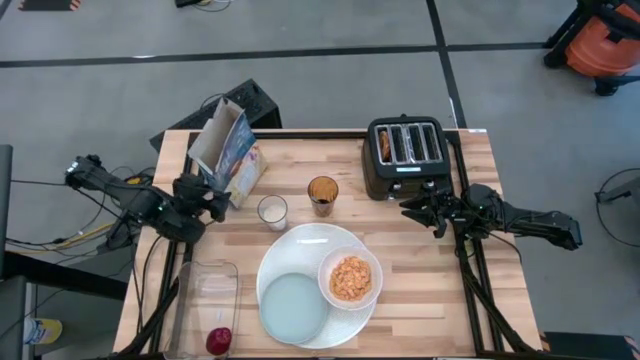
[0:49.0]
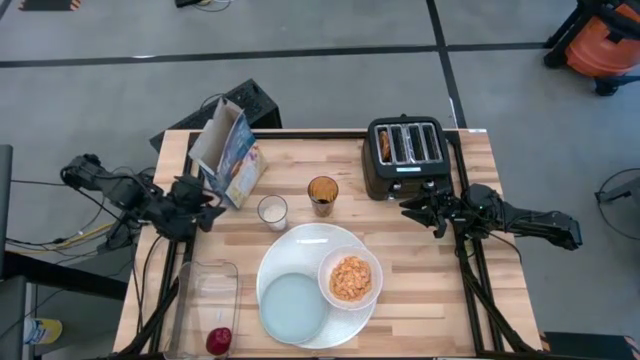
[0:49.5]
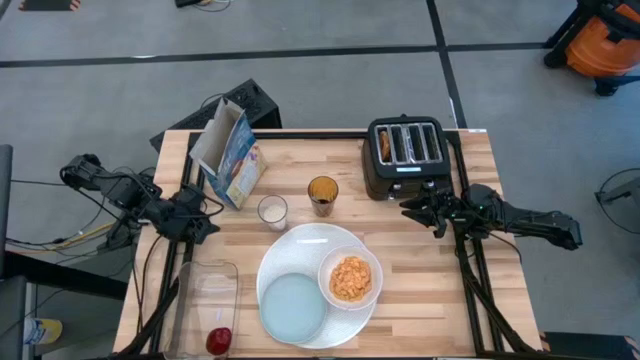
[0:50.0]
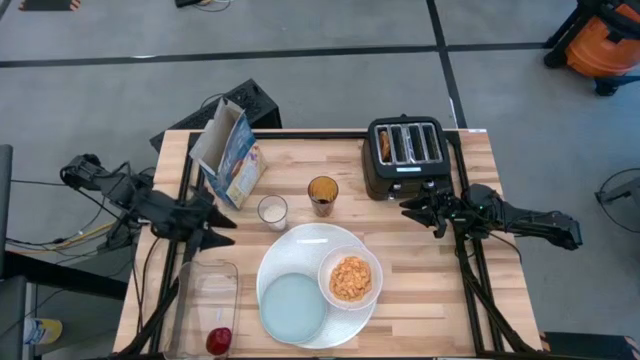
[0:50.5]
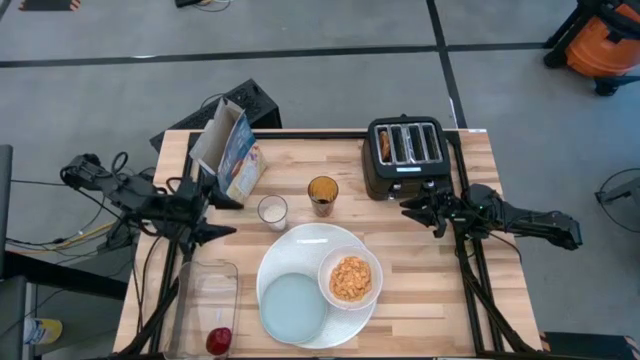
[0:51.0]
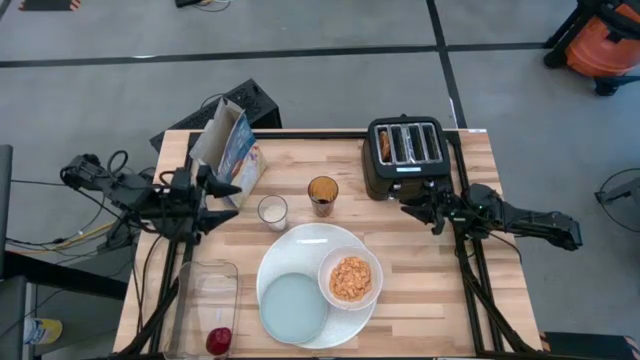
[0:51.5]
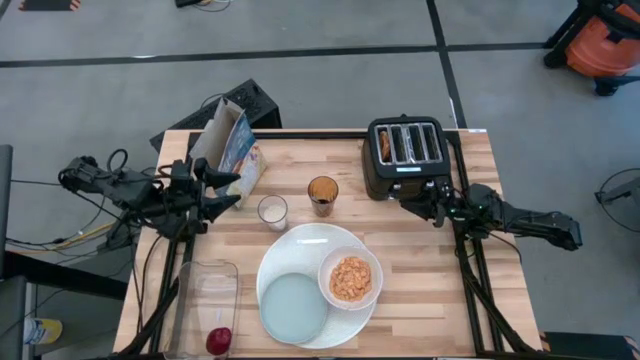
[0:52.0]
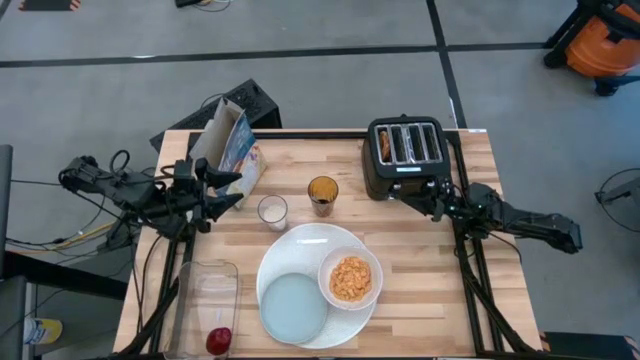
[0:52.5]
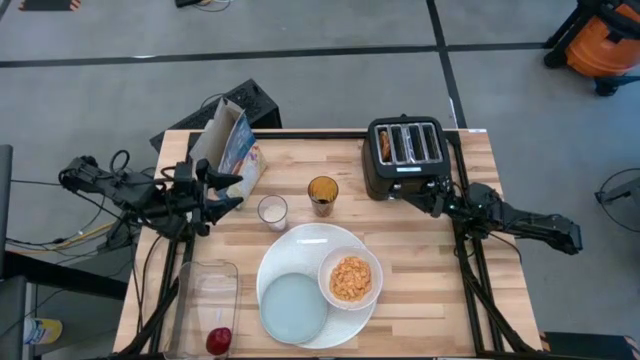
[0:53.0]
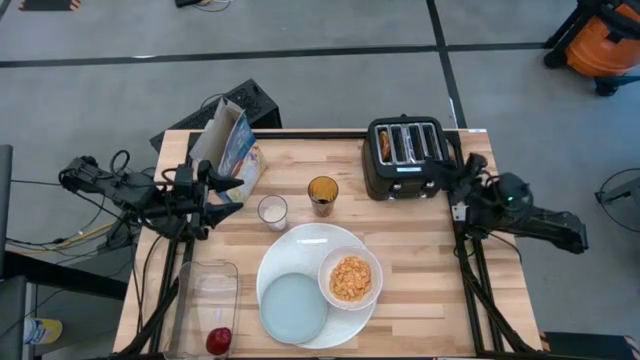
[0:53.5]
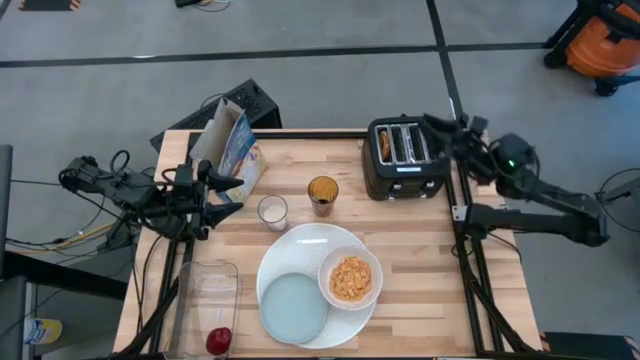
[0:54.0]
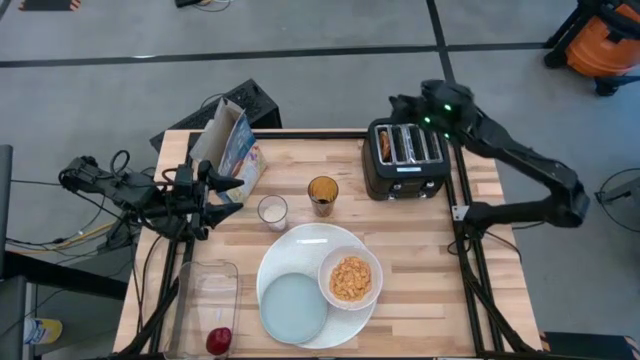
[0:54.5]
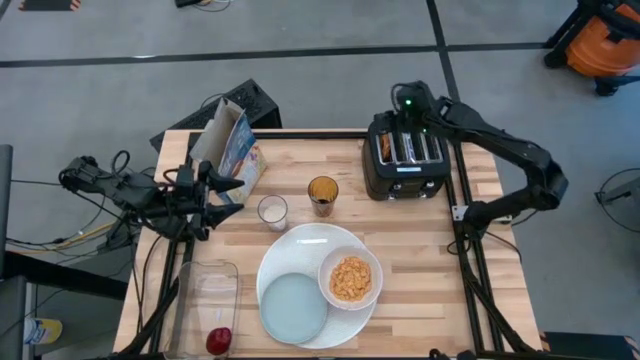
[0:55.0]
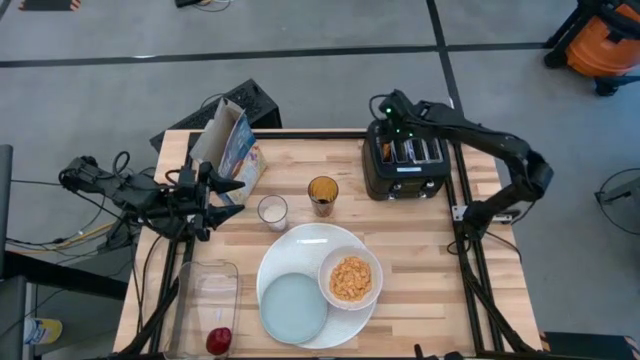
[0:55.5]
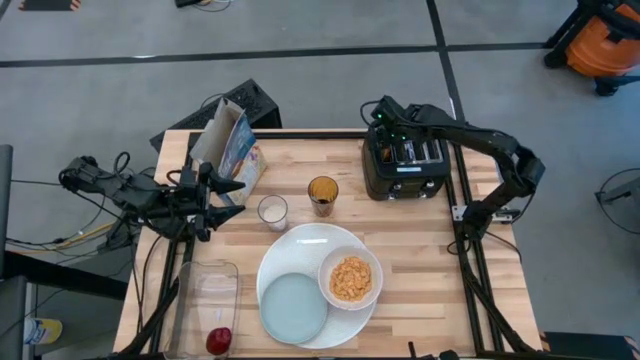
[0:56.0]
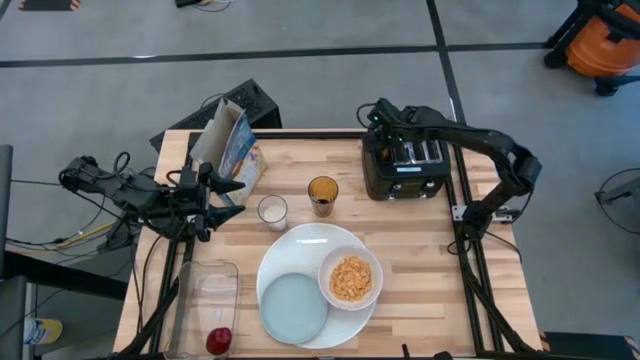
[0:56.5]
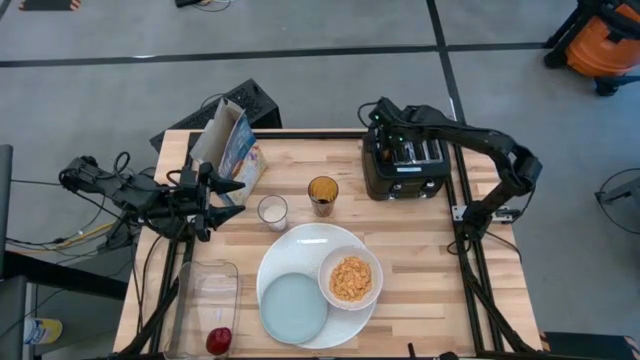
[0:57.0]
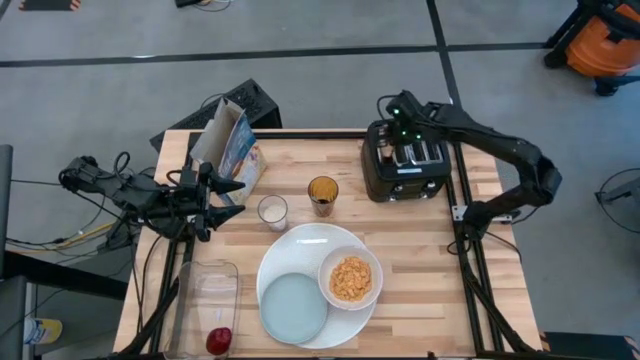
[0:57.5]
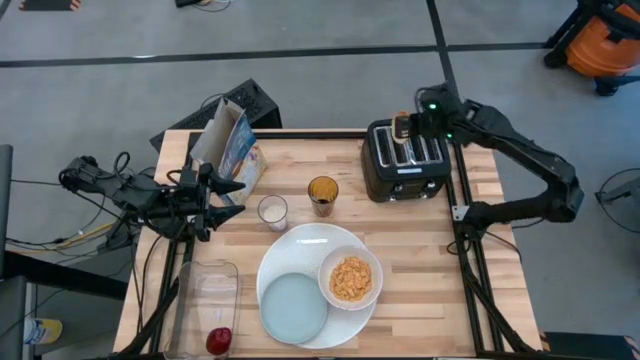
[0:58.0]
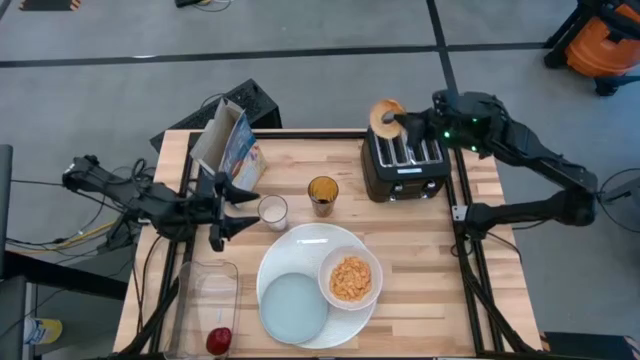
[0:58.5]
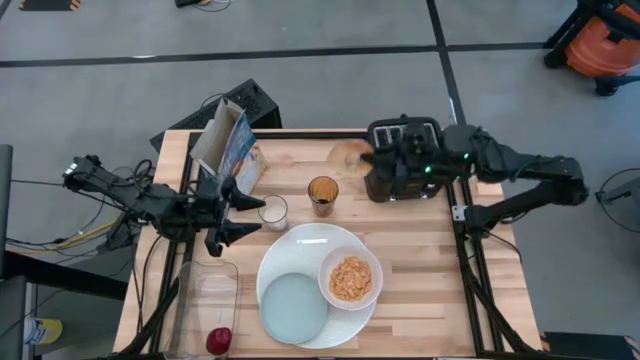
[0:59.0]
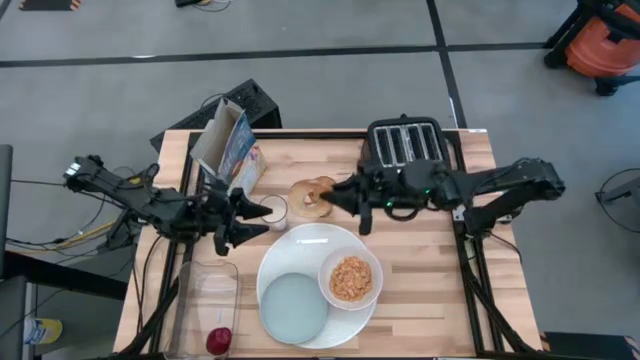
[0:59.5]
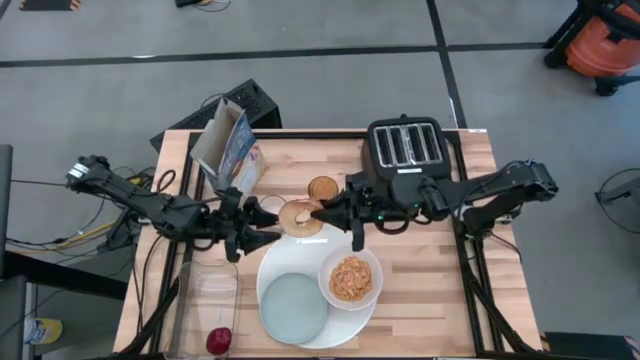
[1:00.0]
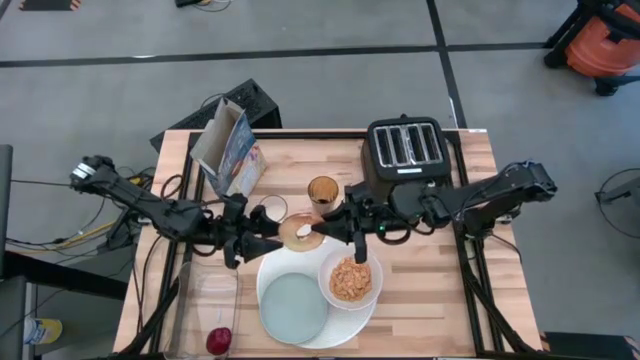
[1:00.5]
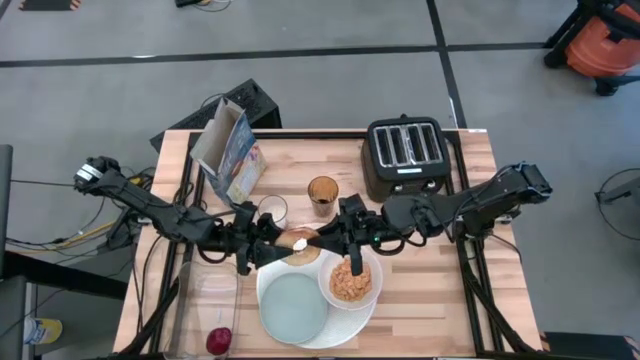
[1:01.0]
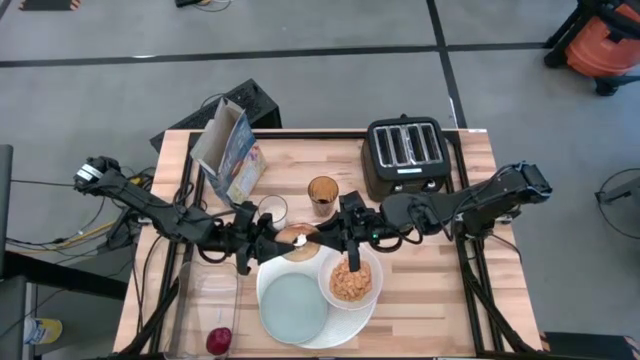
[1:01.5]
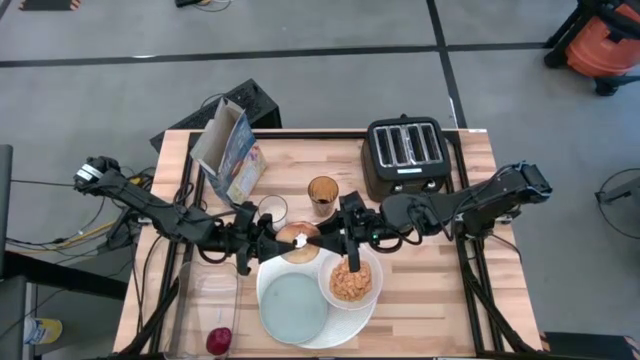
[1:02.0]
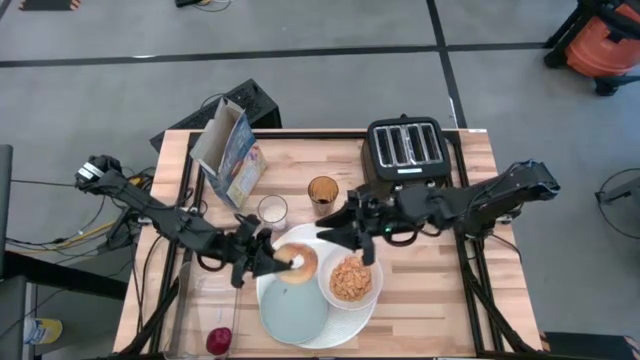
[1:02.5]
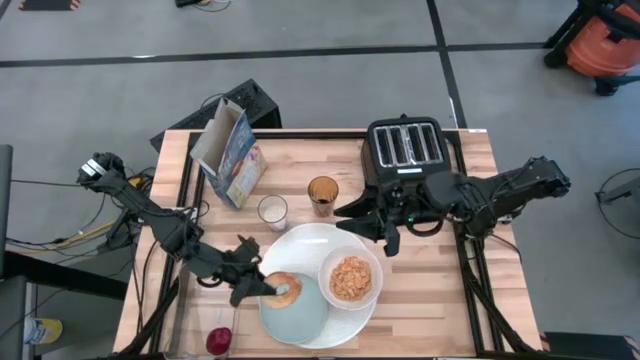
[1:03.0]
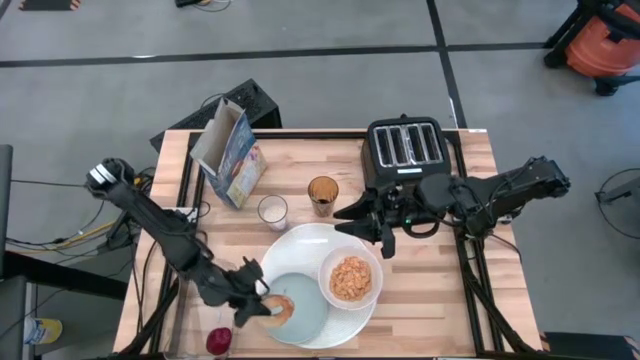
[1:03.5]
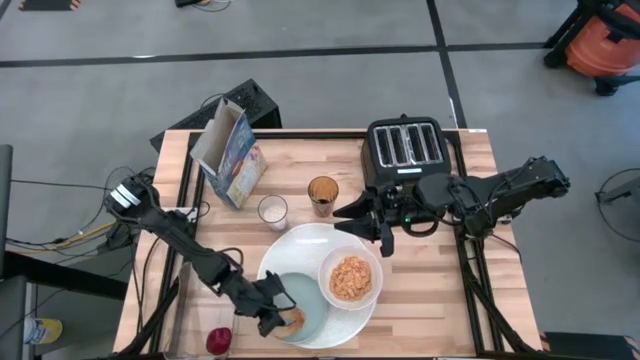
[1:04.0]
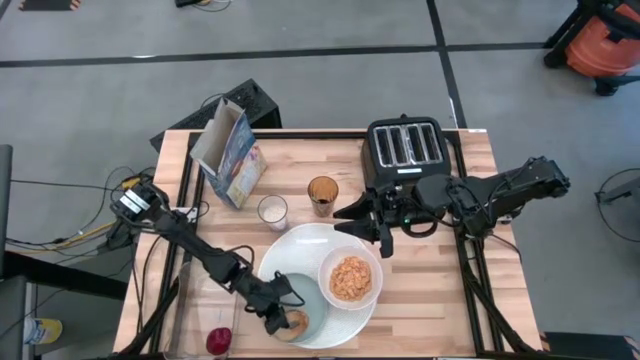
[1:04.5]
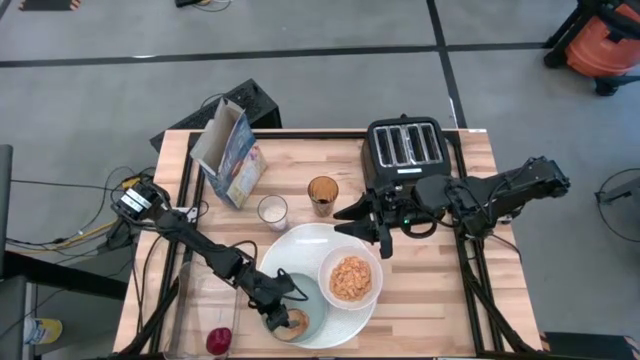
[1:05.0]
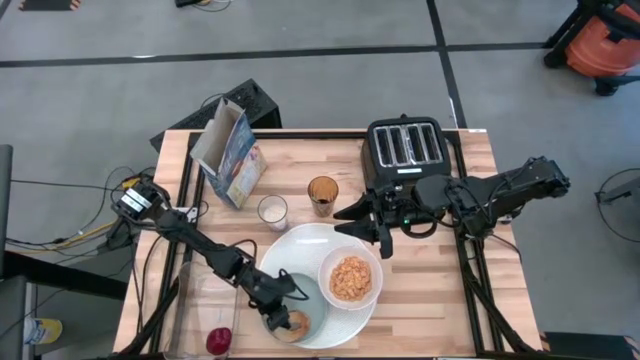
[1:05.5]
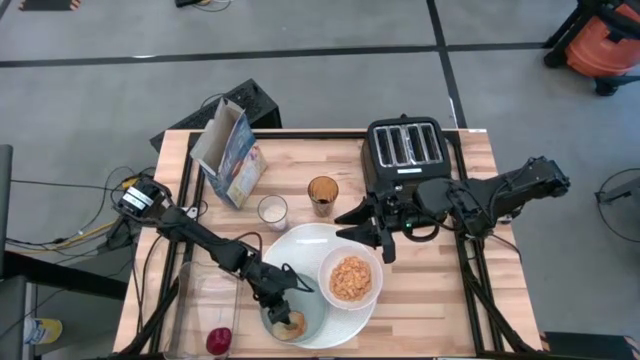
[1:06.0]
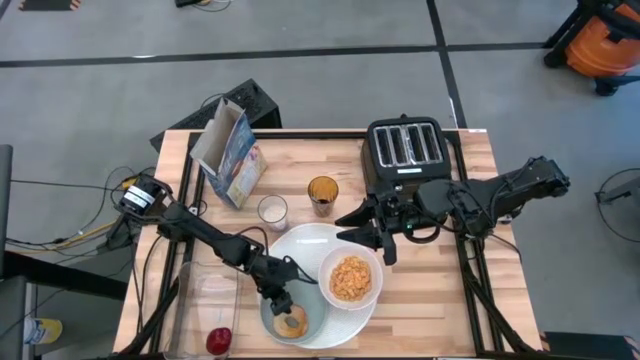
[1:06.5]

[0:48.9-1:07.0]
Task: Arrange a breakfast setting
Put the toasted bread on the blue plate

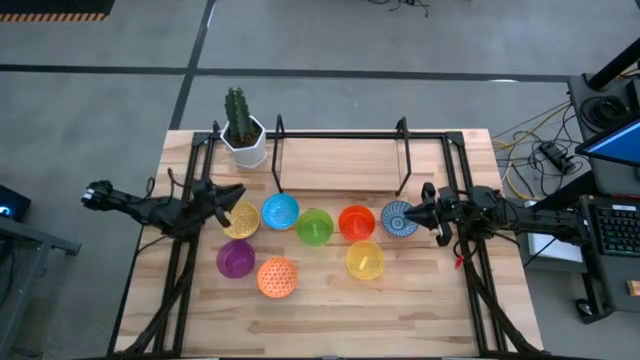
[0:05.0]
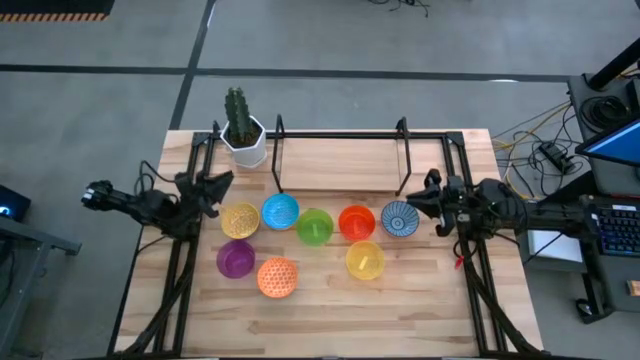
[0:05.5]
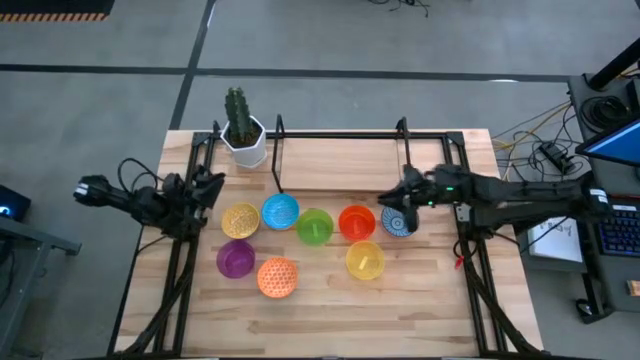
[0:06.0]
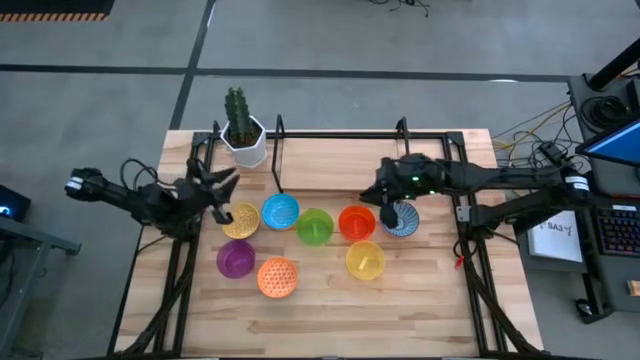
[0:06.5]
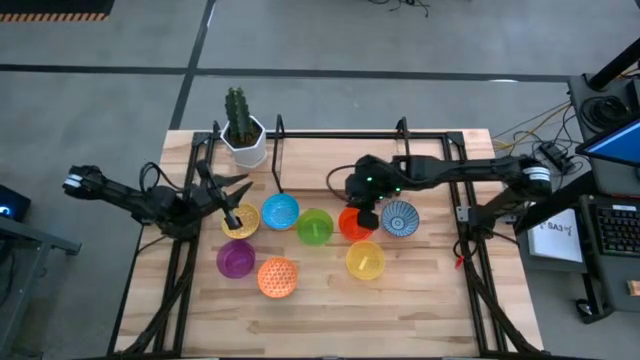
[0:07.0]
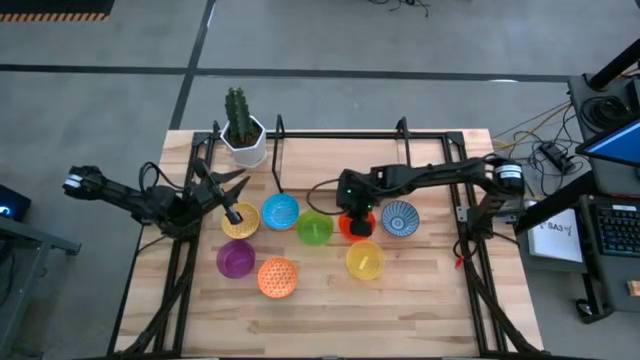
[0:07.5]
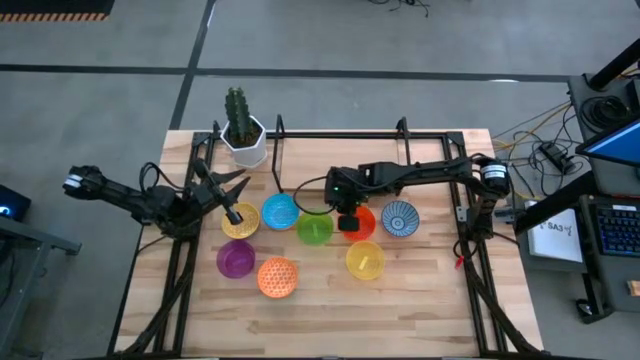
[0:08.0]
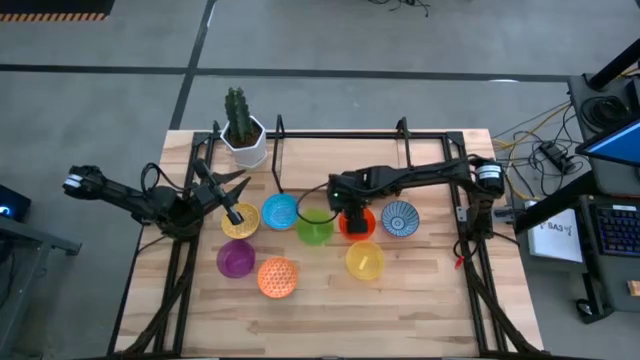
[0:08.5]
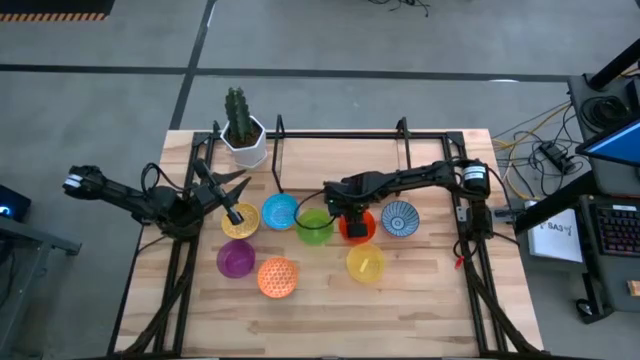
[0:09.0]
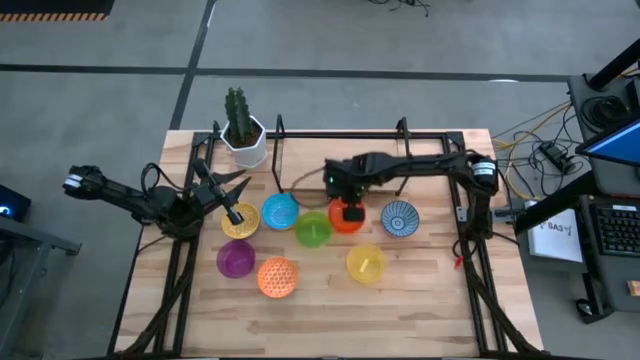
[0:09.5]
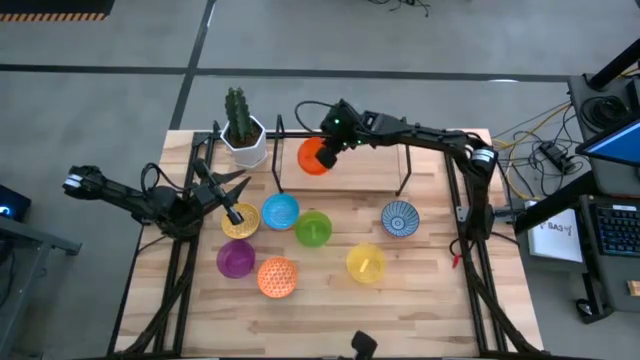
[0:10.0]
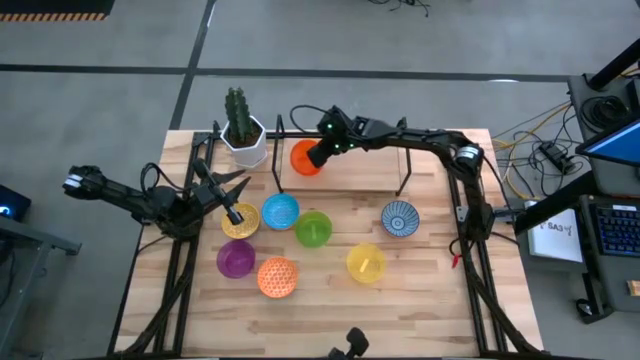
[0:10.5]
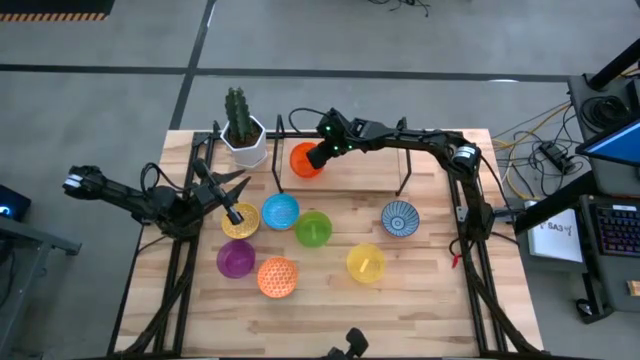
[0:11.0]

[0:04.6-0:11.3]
Task: Place and stack bowls onto a shelf
Put the orange bowl on the shelf
